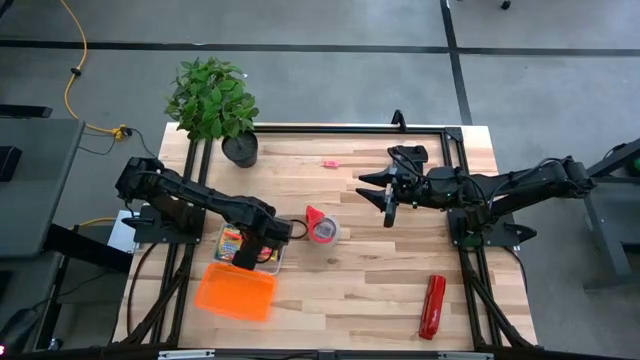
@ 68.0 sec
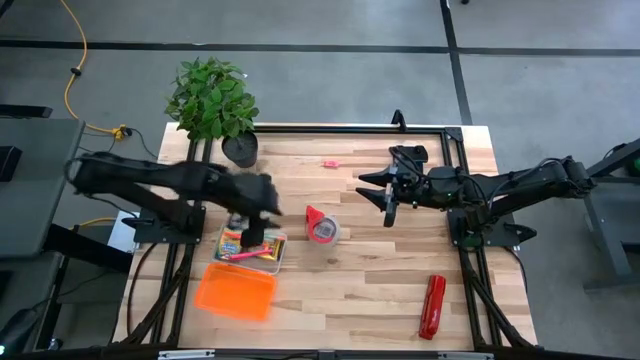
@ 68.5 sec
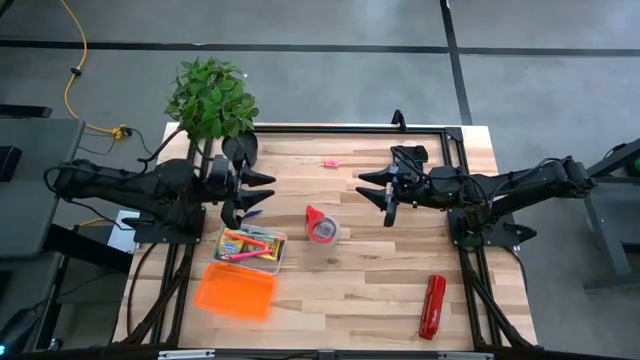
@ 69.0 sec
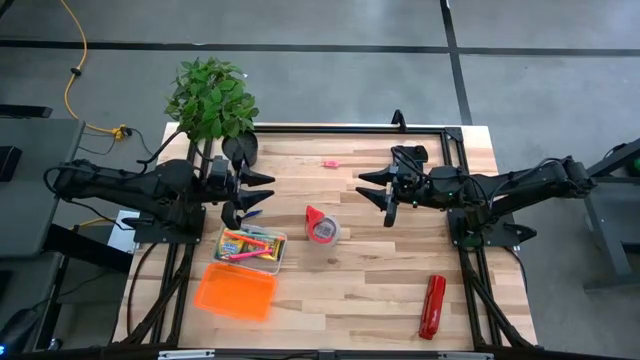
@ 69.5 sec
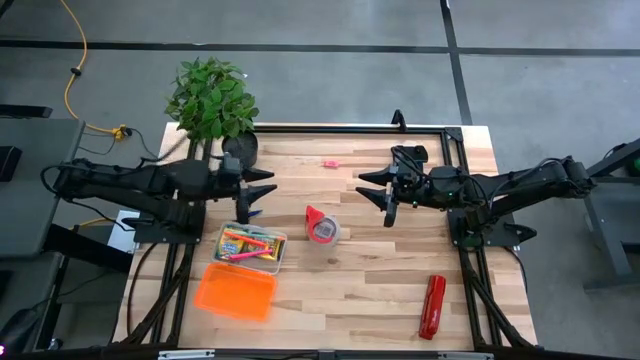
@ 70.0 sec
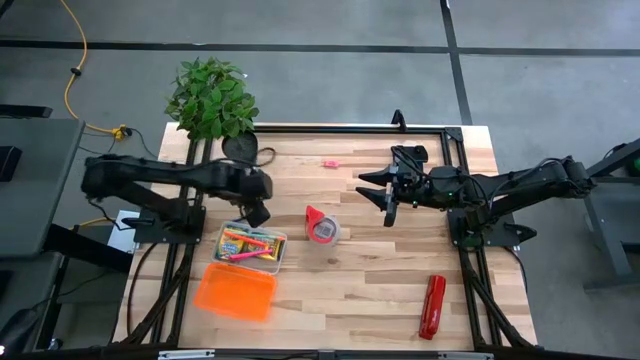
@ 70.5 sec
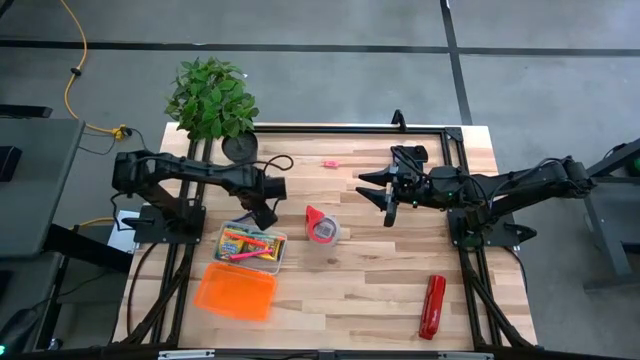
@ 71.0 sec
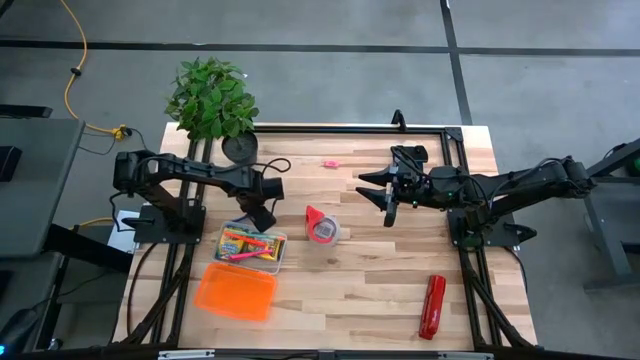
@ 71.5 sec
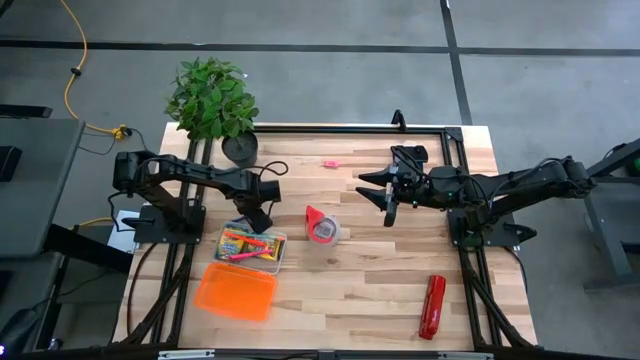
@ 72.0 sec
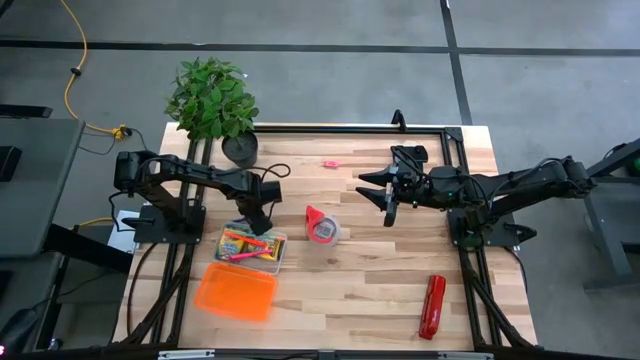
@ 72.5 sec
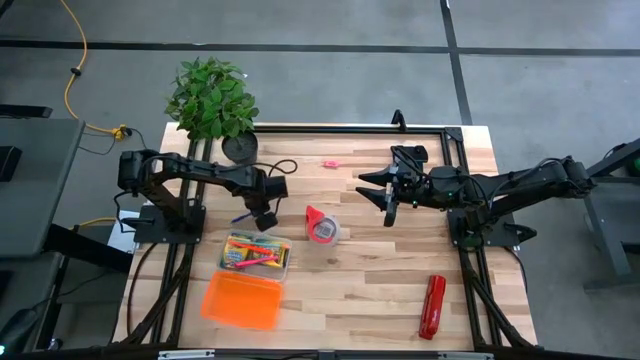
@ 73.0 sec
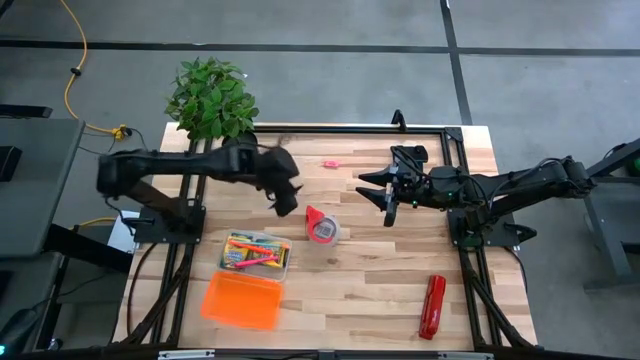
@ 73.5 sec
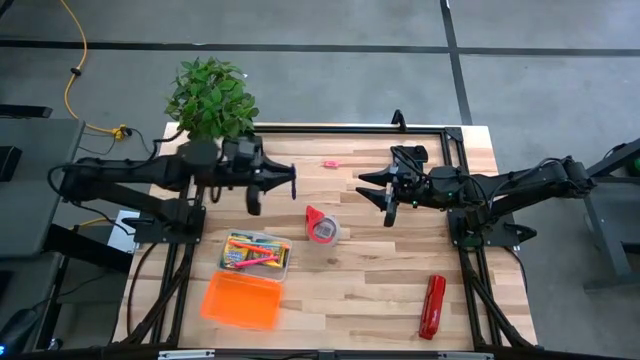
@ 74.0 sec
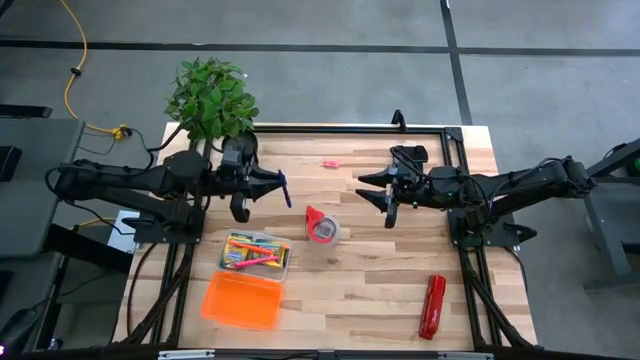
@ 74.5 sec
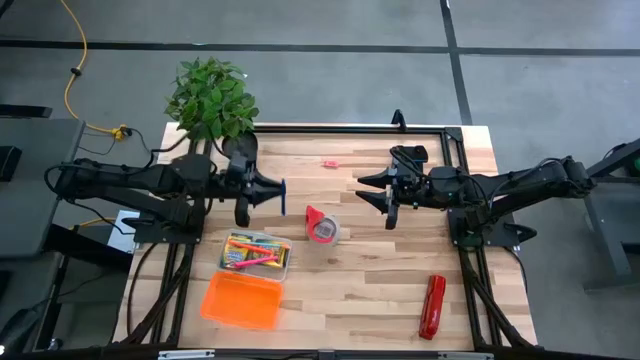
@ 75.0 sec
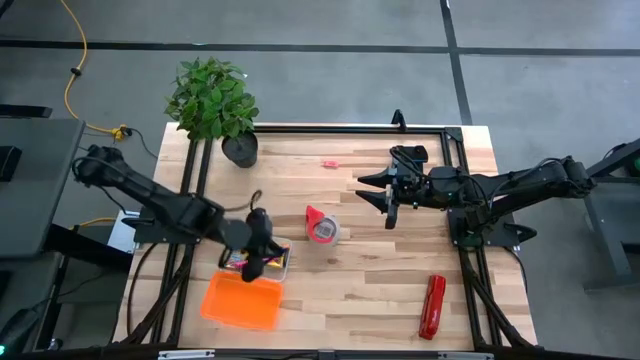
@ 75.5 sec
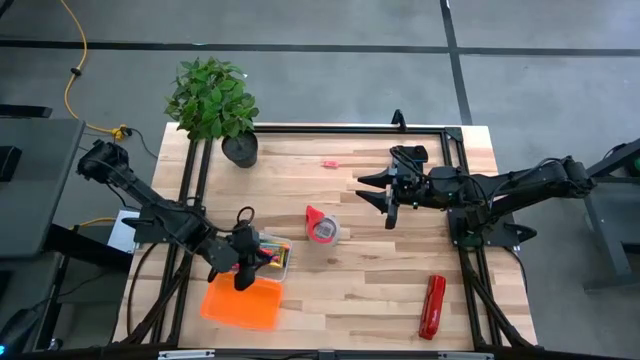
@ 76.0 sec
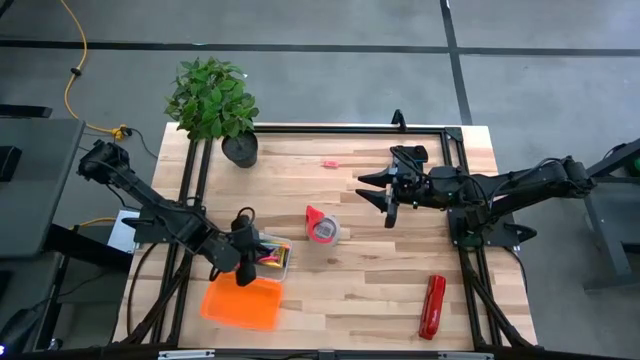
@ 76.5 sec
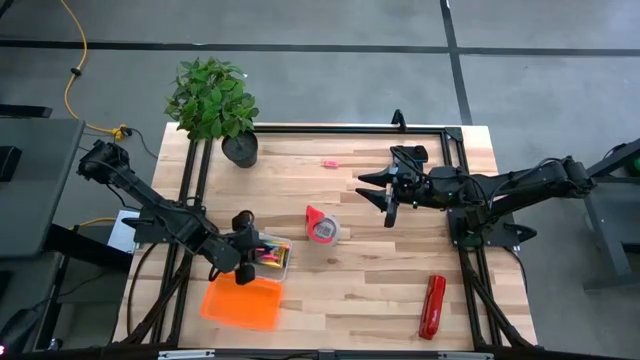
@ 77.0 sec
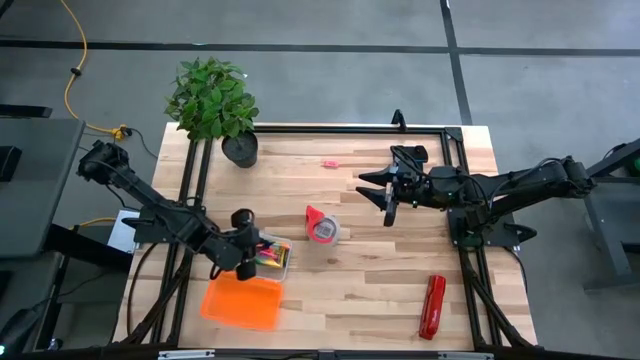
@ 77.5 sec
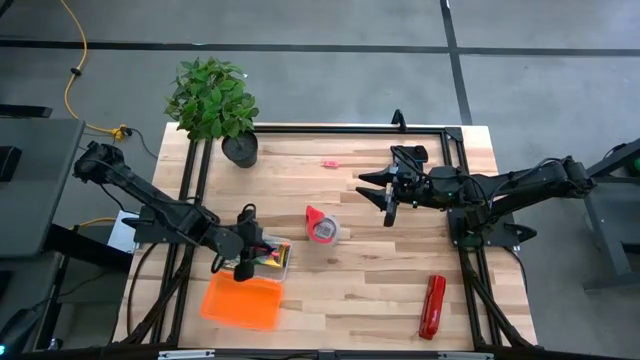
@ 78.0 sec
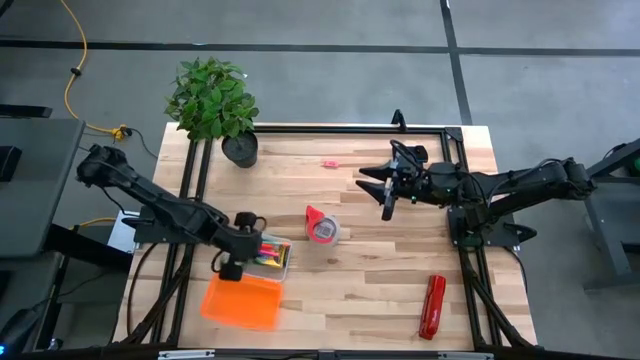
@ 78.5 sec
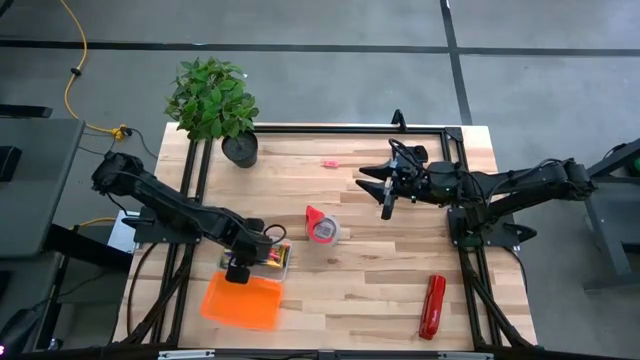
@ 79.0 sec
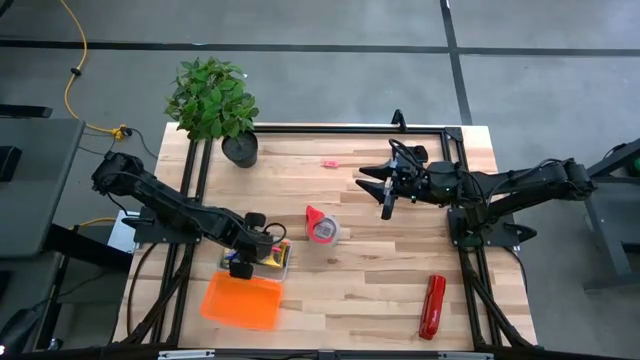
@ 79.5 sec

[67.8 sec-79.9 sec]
Task: Pack school essentials
Put the blue pen into the orange supply box

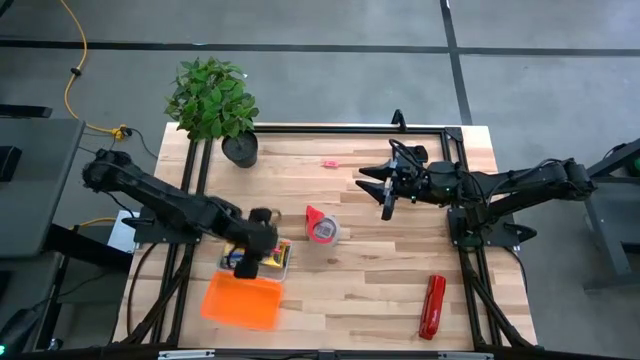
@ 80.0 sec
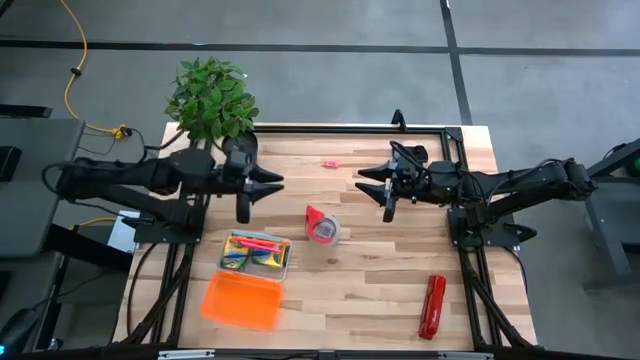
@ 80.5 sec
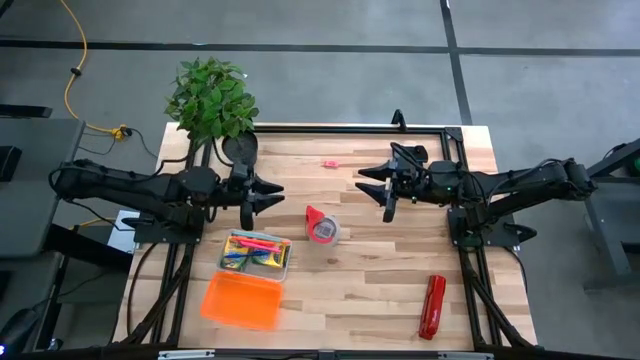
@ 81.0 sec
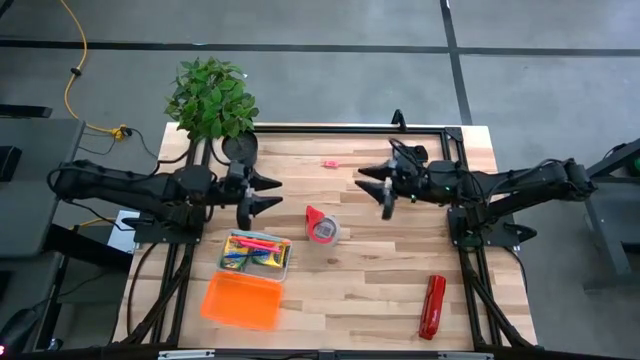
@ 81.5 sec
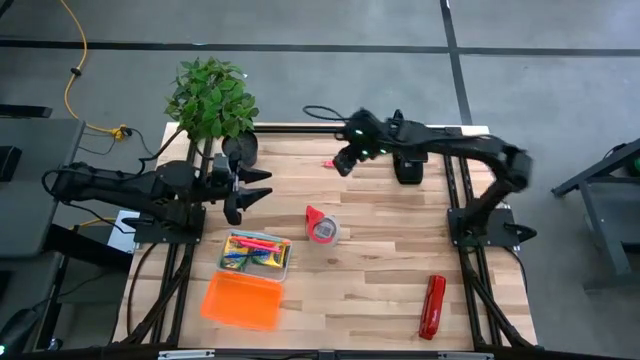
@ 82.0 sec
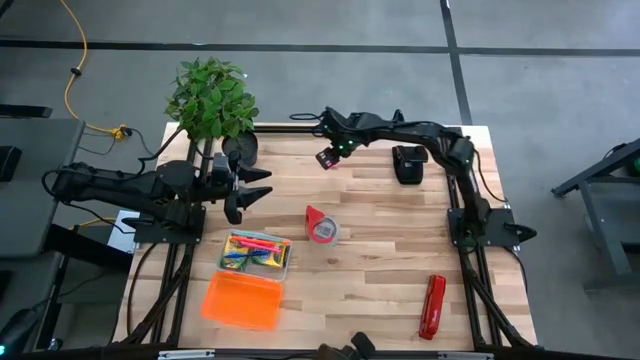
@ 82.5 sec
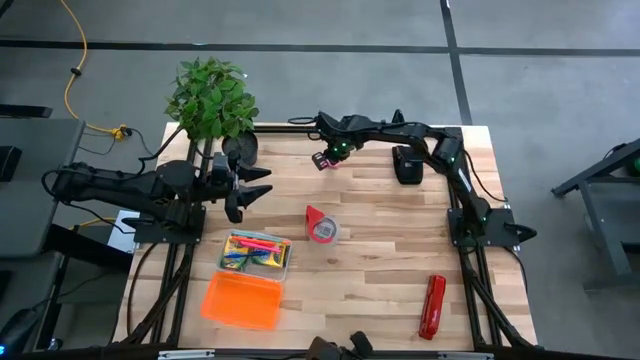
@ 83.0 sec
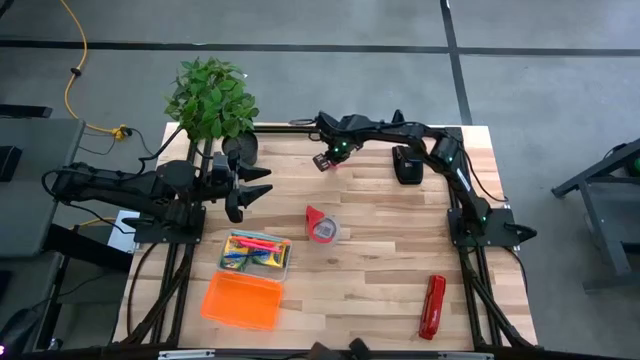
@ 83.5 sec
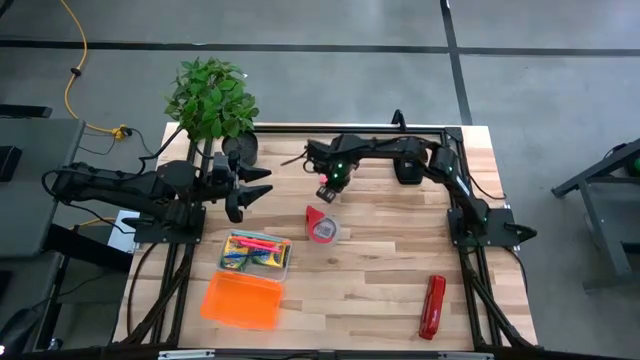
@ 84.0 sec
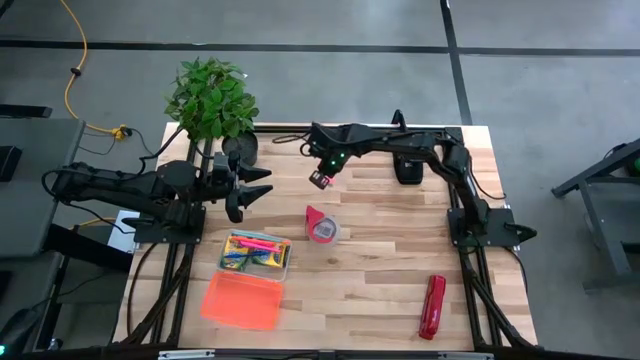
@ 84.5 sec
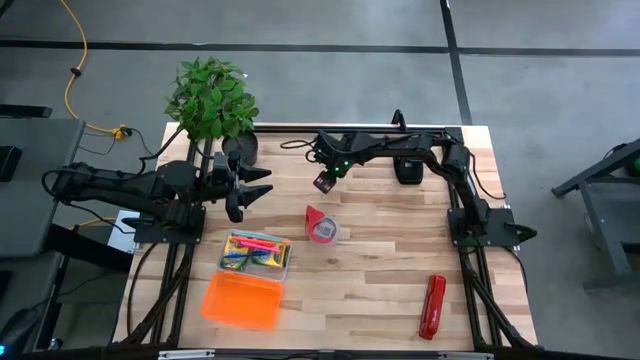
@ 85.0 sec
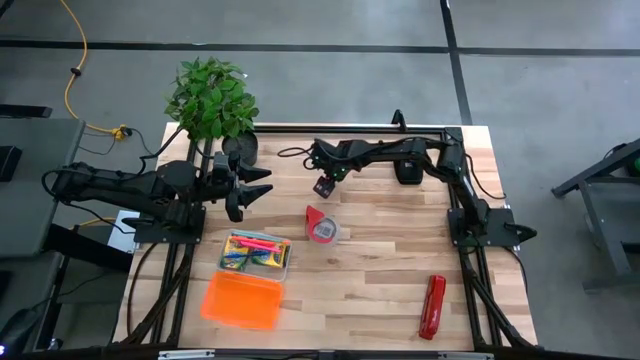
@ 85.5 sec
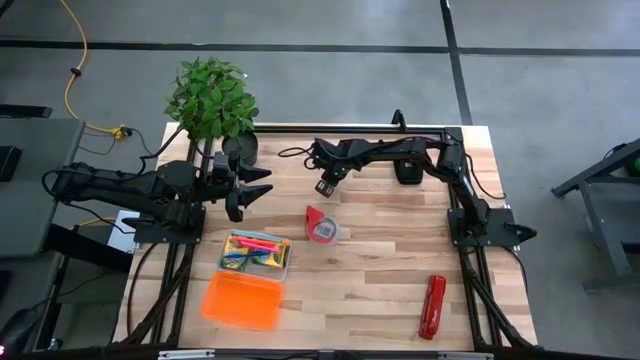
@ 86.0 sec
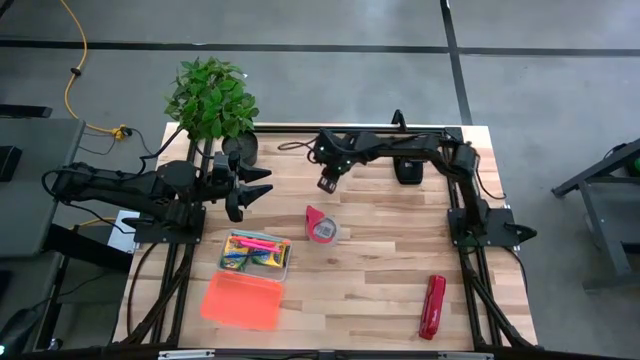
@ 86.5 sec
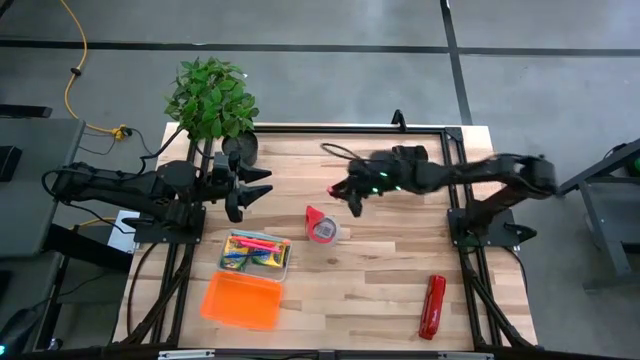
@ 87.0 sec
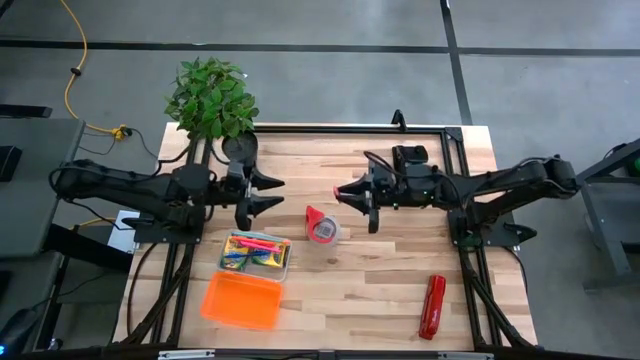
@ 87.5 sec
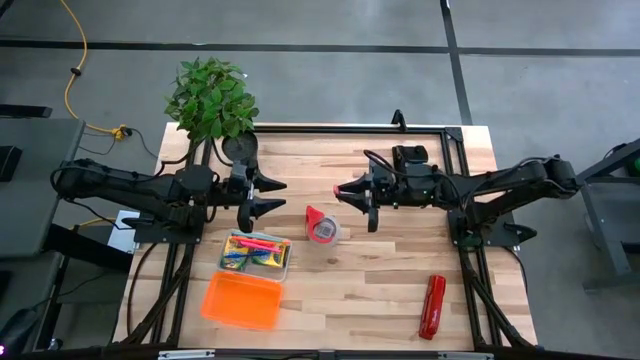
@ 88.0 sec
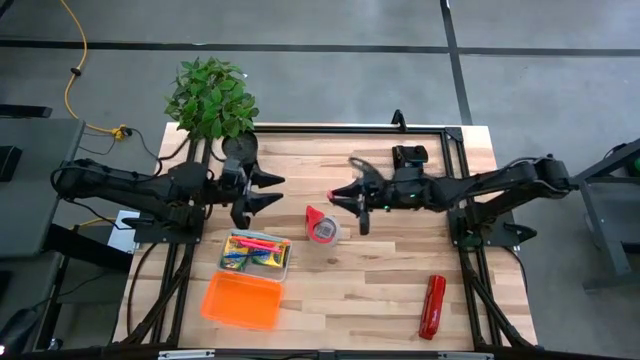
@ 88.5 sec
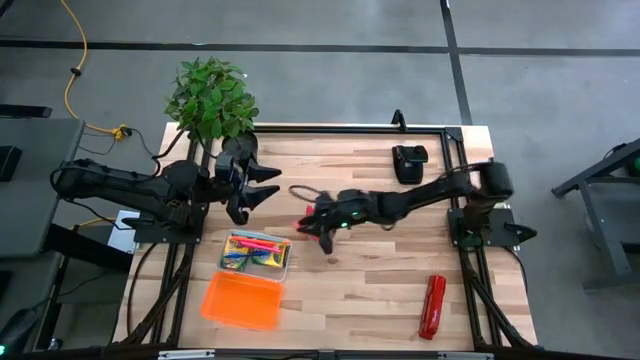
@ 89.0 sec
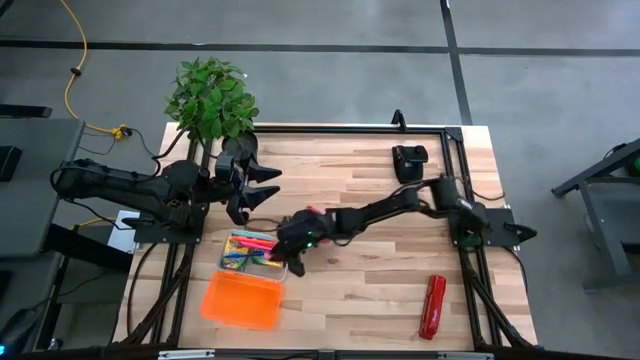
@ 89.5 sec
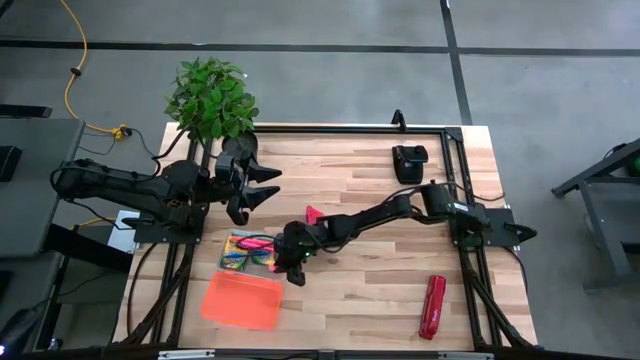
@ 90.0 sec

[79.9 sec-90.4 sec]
Put the pink eraser into the orange supply box
